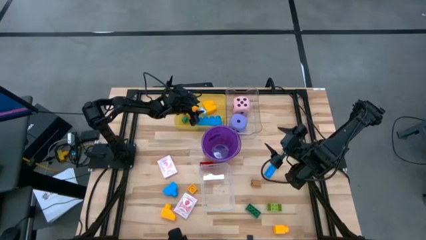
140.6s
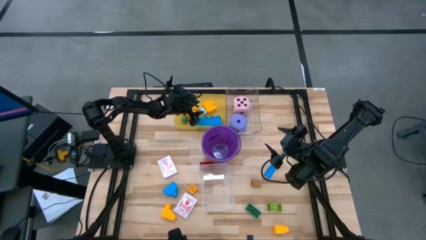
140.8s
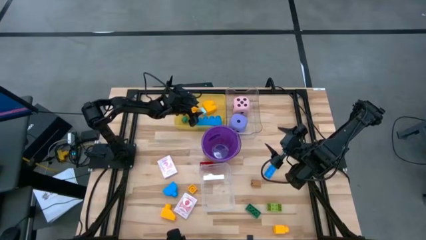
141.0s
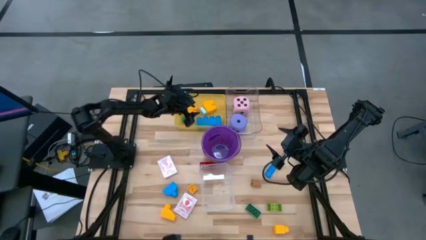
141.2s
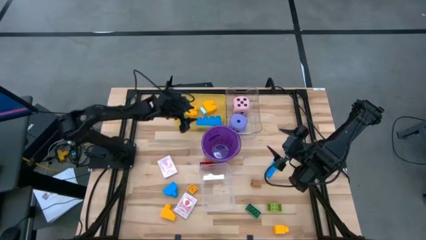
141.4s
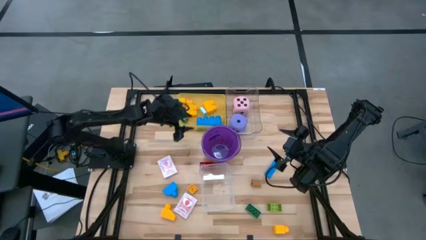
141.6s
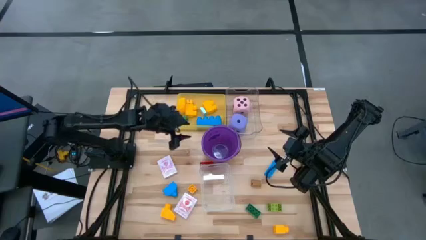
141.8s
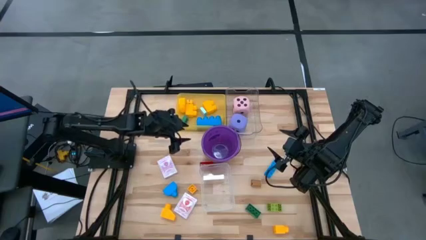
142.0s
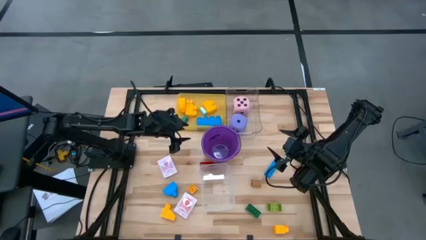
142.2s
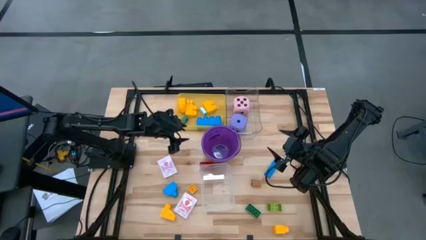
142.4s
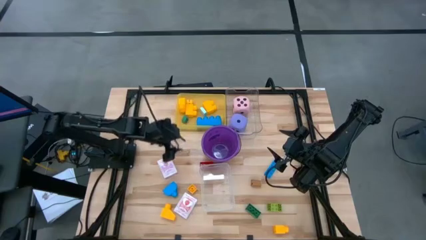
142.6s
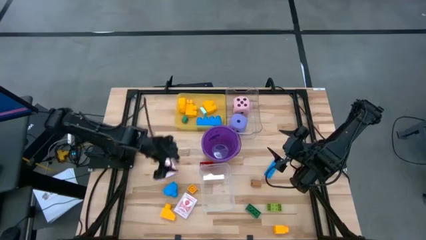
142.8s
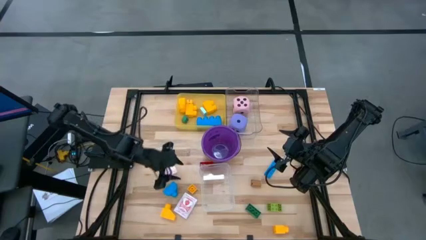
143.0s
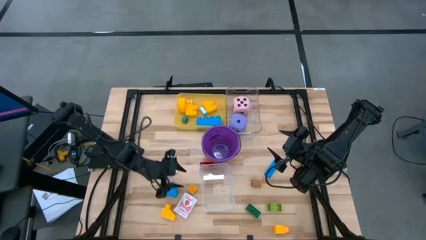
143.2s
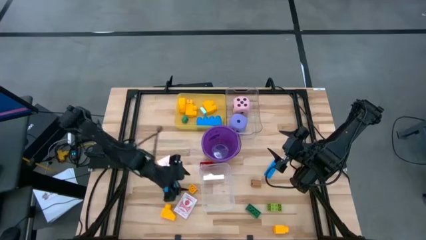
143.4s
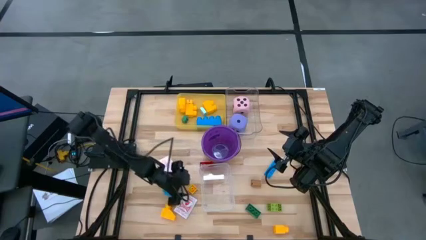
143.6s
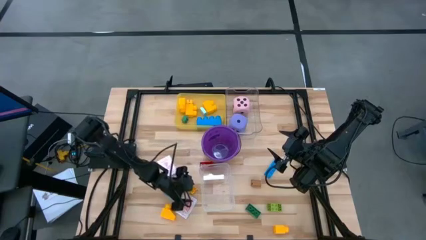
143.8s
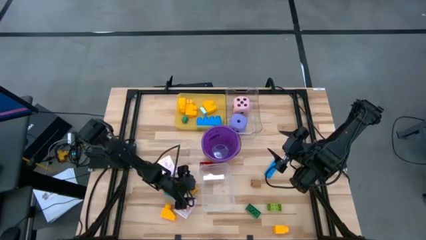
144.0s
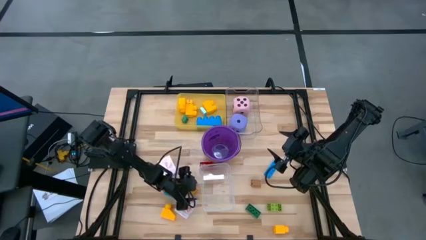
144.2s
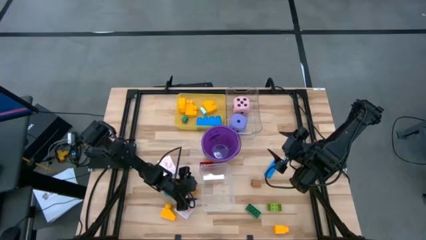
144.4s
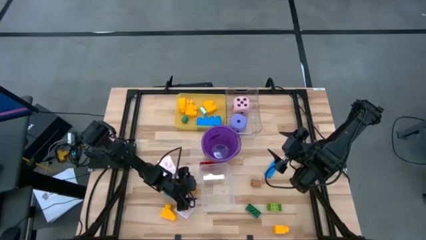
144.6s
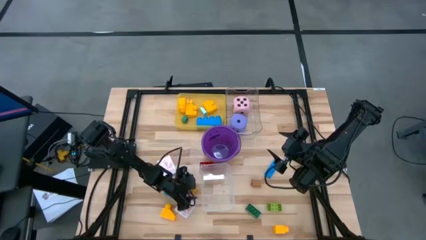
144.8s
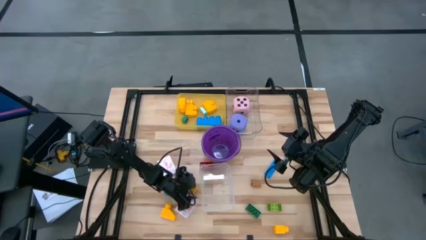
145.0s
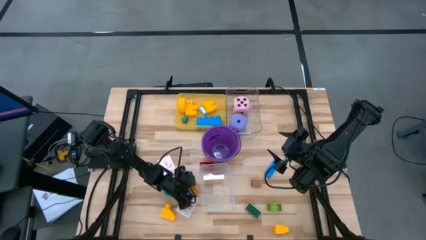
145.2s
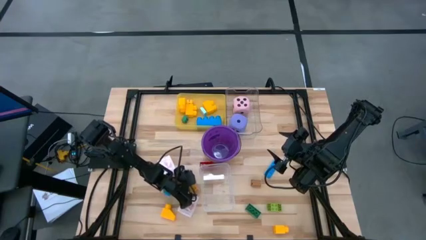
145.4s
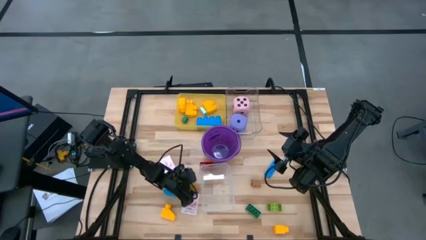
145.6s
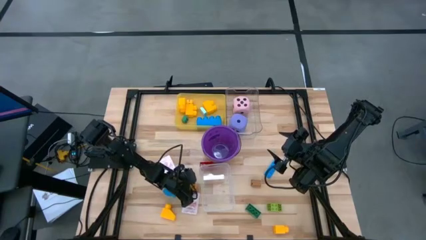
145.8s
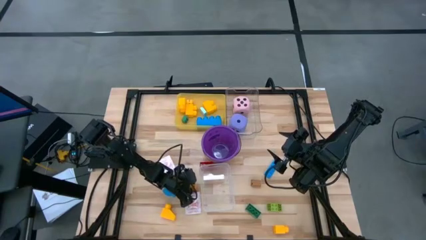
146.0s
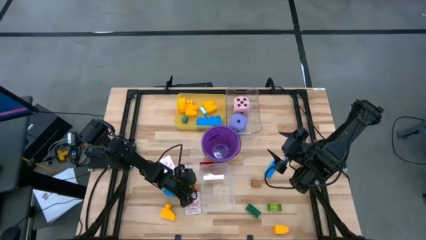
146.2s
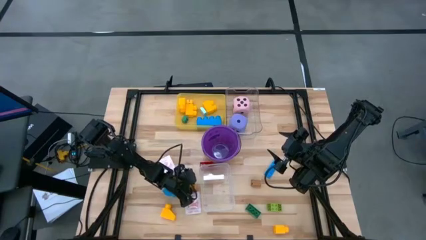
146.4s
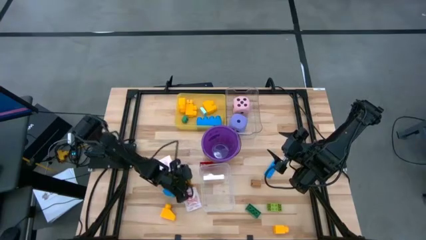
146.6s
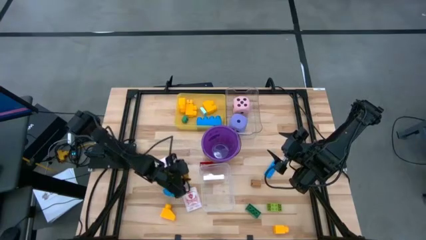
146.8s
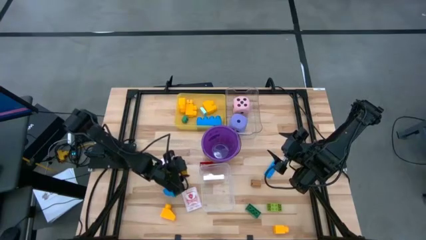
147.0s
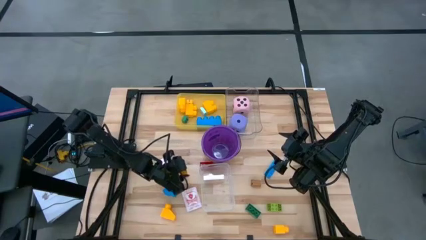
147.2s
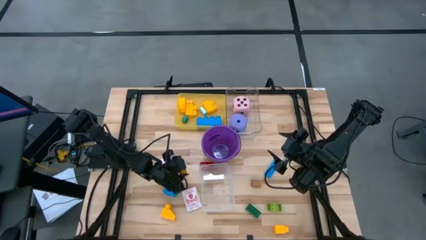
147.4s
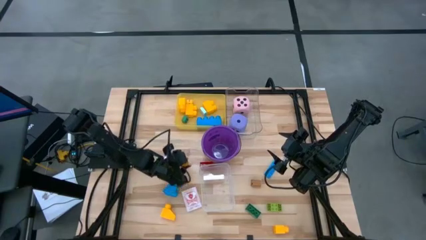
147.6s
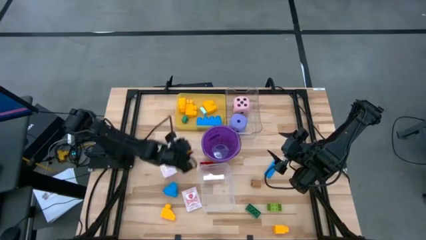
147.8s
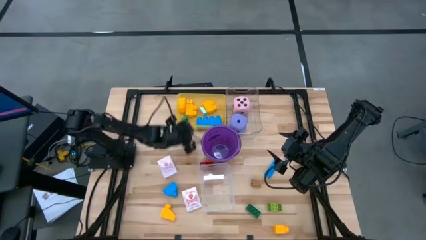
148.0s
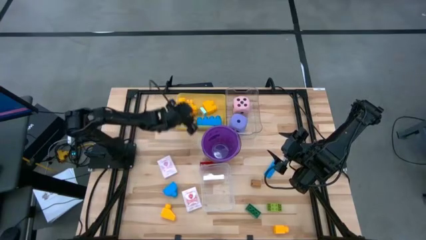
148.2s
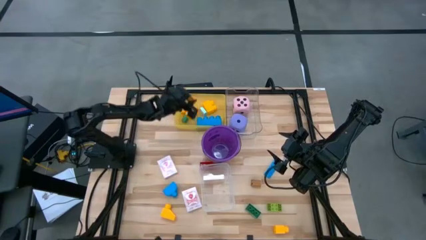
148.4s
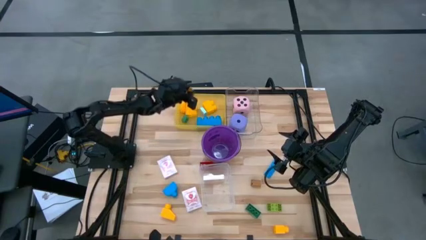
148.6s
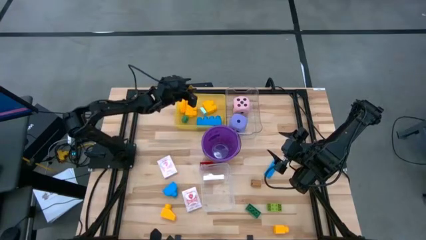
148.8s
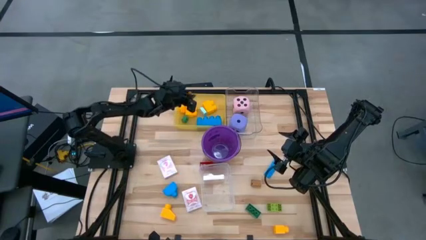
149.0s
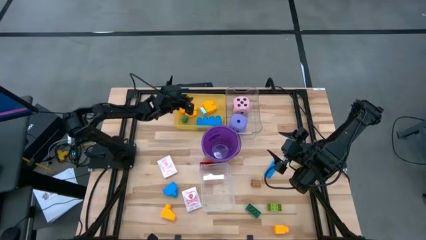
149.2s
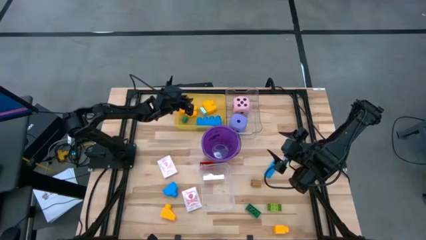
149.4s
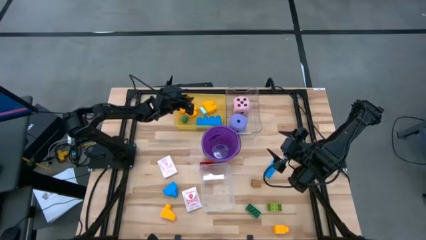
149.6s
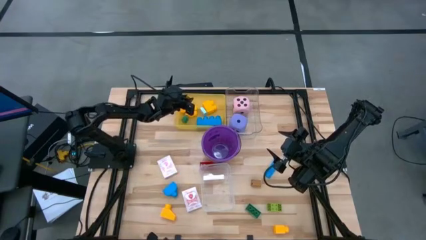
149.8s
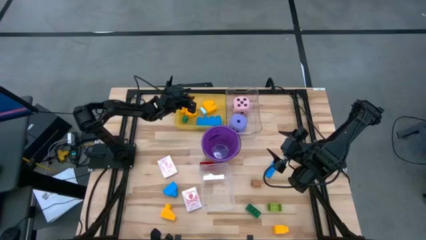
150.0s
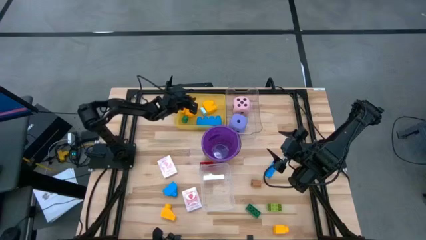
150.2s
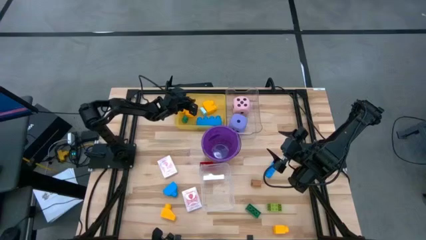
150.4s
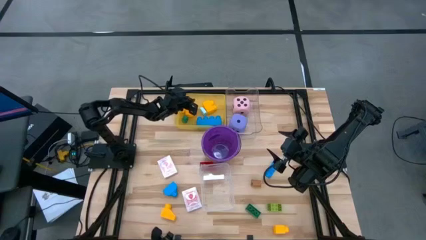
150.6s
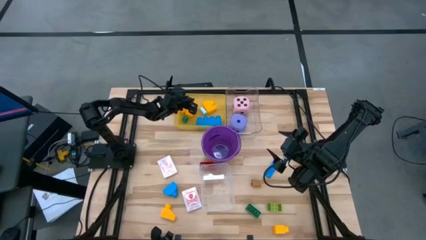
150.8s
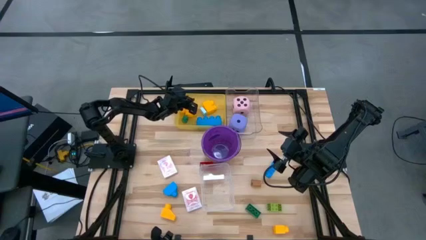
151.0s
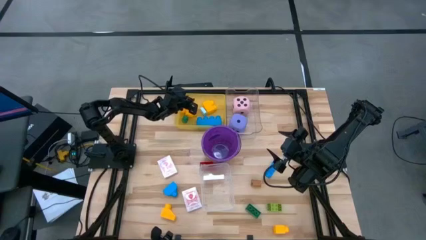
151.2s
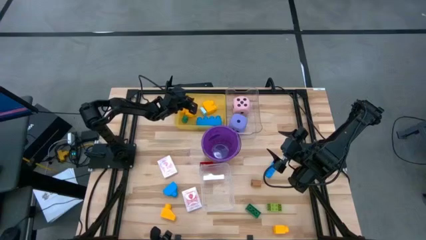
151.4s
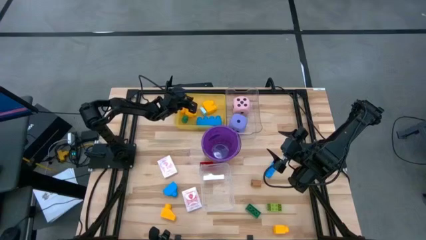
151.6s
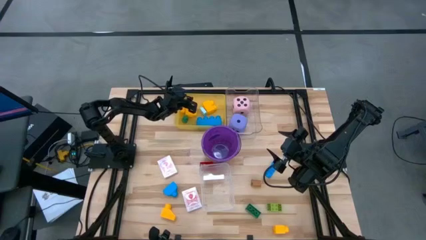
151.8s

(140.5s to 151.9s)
Task: Pick & Place Toys
Put the yellow game piece into the yellow bin

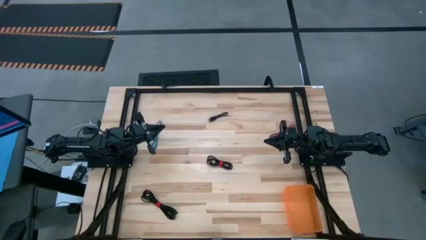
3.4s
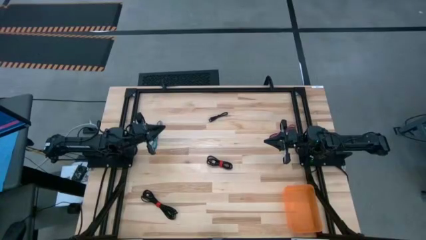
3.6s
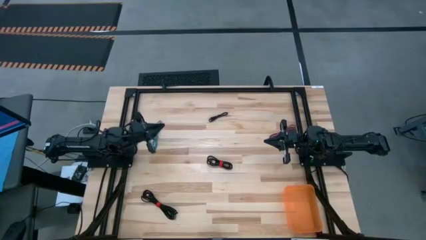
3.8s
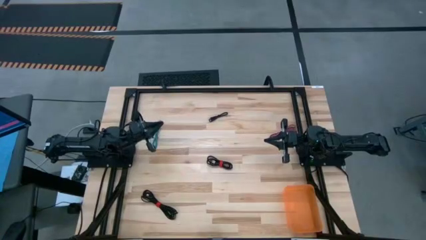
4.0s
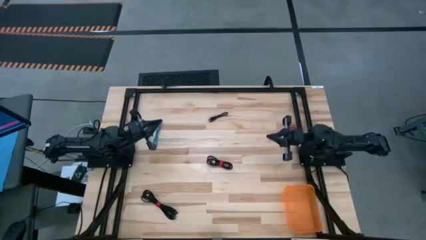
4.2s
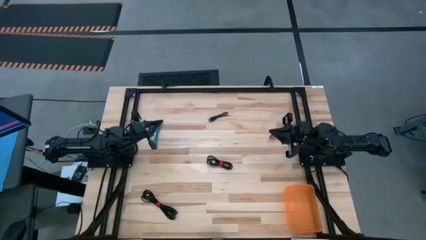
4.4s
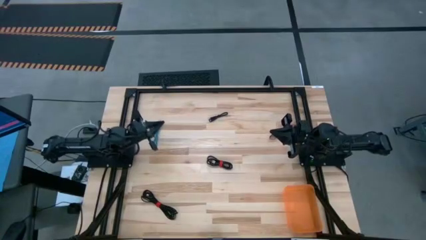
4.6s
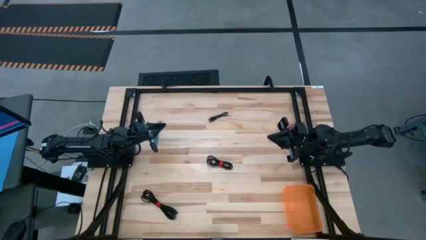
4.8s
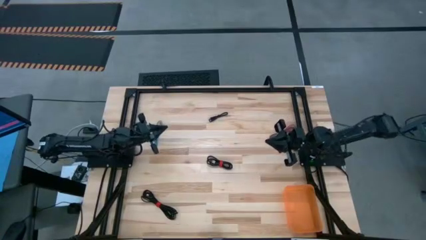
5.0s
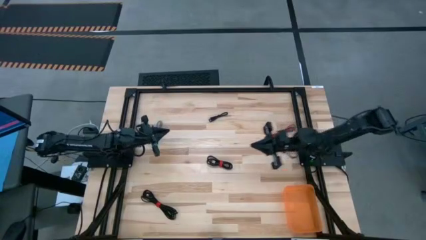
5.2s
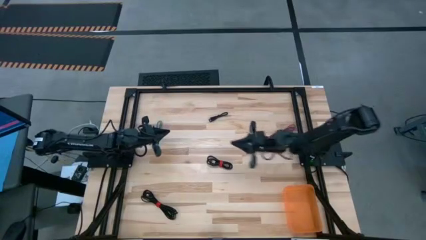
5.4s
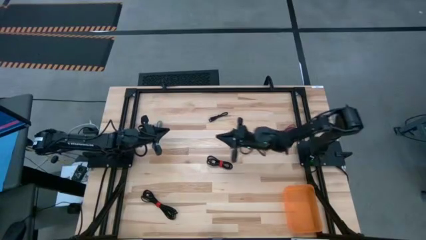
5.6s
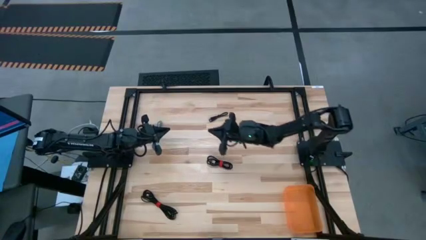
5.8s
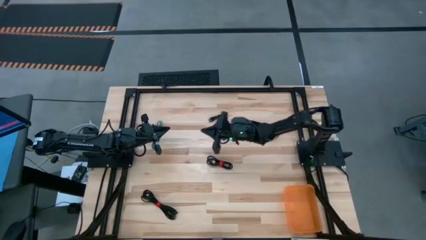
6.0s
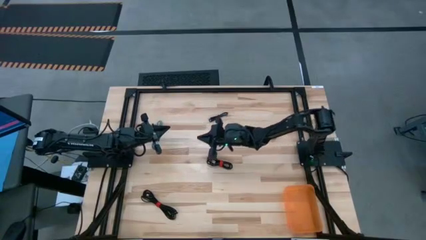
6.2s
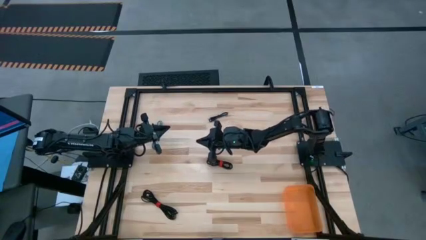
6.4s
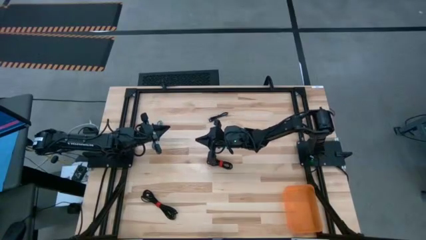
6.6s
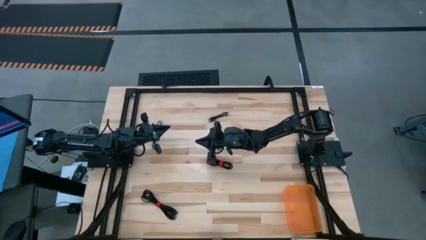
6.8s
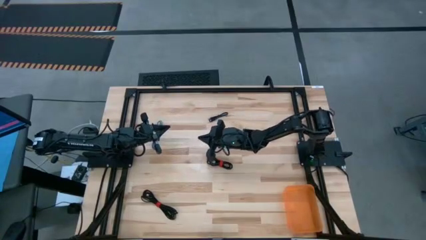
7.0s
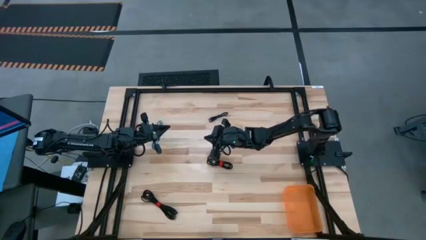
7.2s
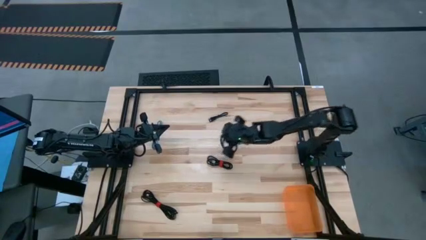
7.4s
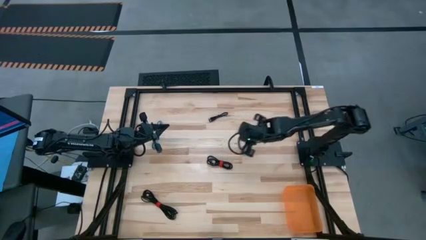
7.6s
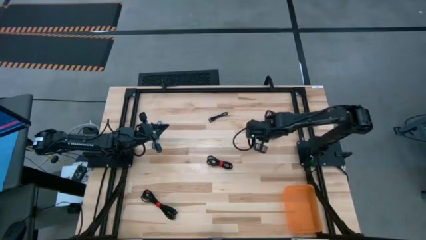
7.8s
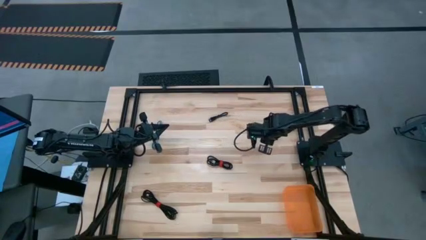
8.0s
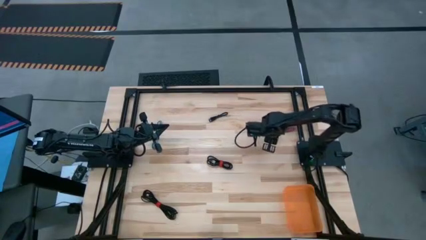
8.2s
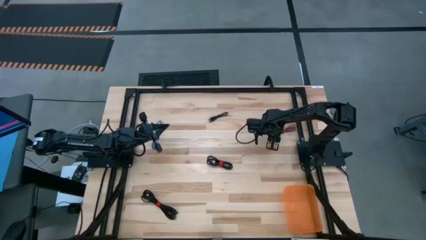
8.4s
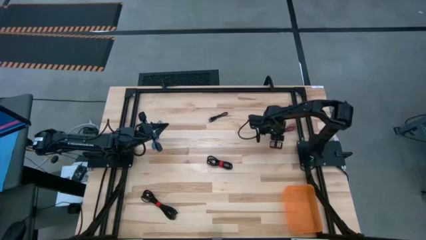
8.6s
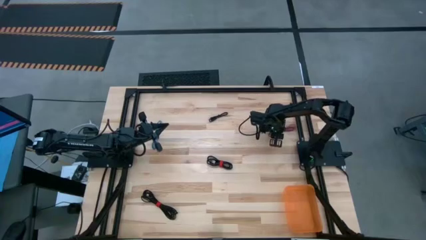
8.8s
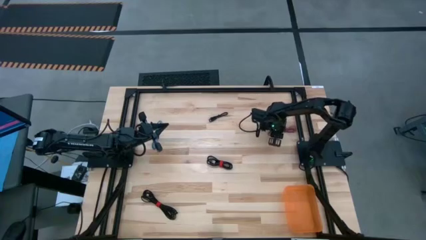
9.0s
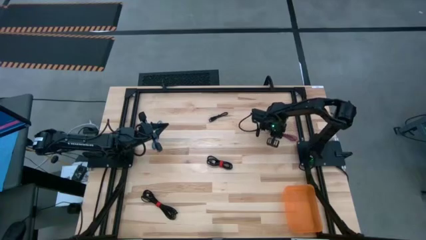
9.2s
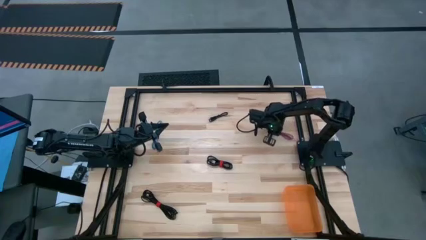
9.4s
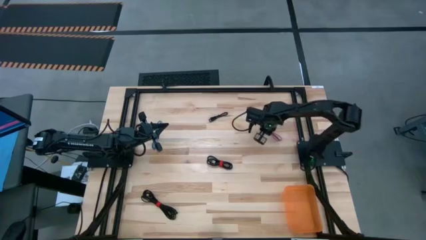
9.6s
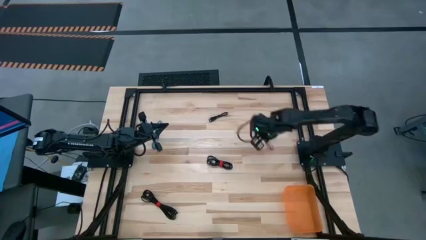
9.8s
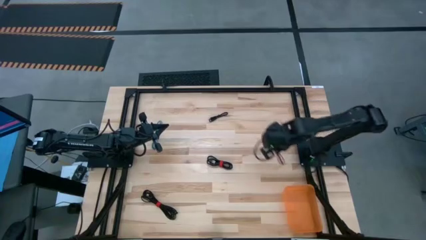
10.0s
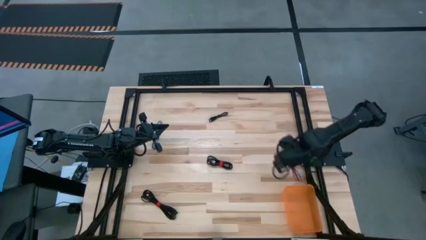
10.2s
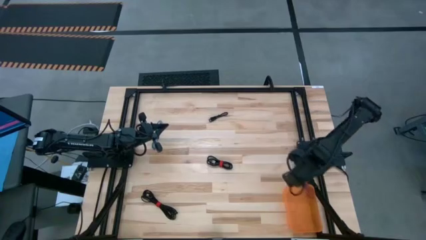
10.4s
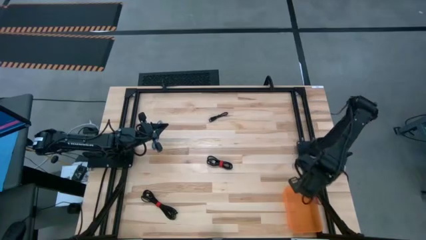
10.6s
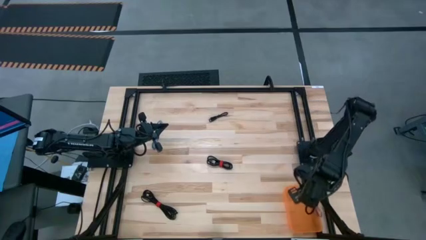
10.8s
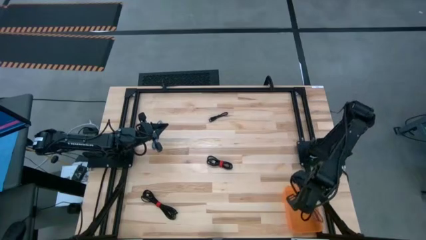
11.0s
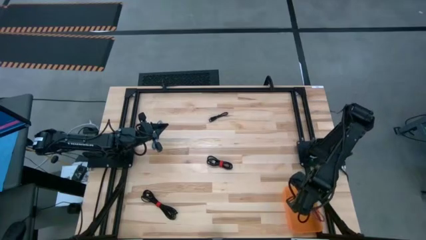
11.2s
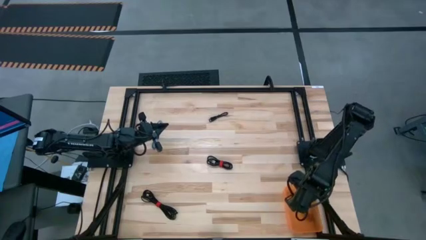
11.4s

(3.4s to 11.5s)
Task: Pick and place USB-C Cables
Put the black pink charger cable into the orange bin
